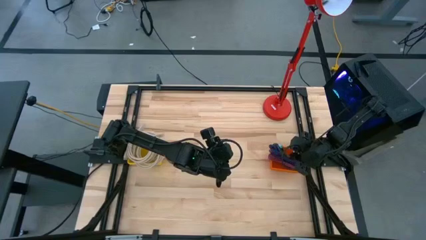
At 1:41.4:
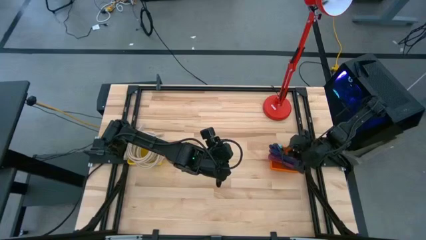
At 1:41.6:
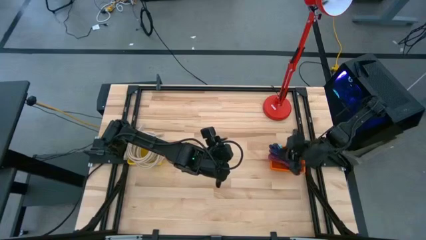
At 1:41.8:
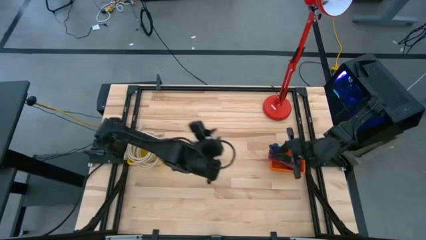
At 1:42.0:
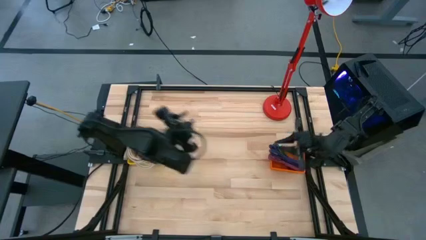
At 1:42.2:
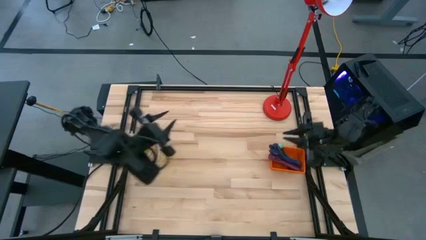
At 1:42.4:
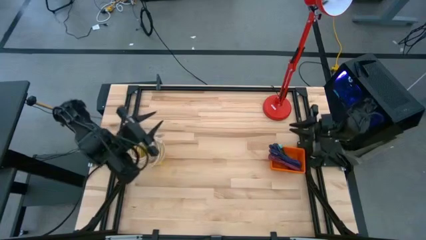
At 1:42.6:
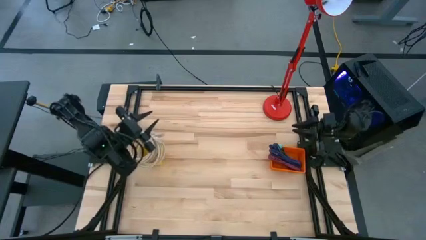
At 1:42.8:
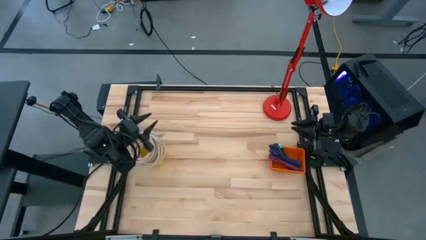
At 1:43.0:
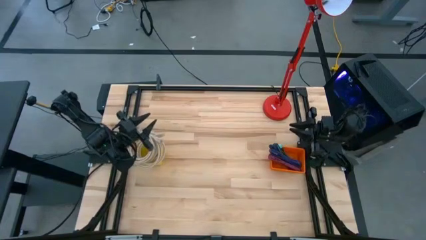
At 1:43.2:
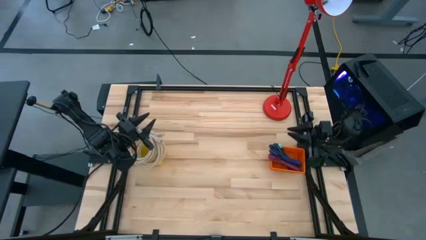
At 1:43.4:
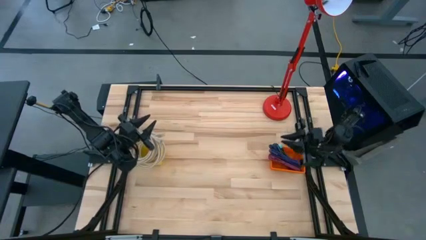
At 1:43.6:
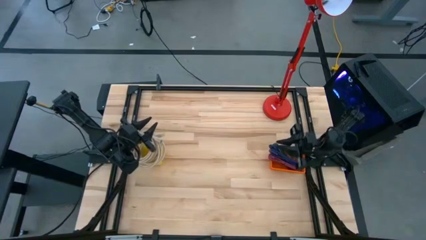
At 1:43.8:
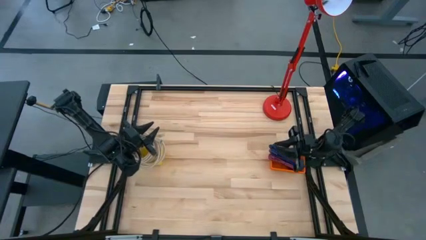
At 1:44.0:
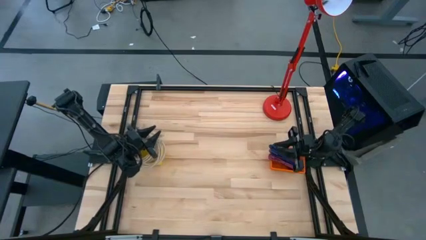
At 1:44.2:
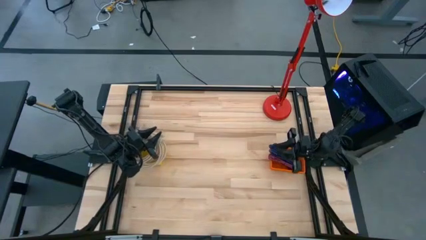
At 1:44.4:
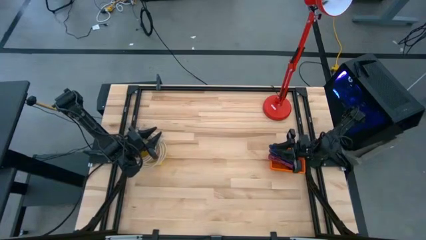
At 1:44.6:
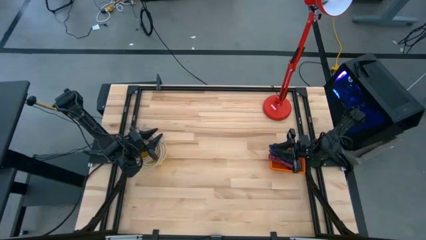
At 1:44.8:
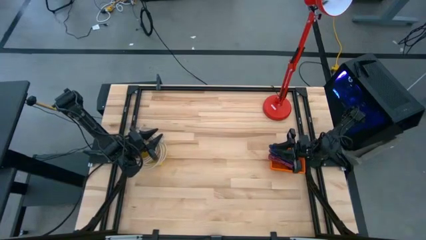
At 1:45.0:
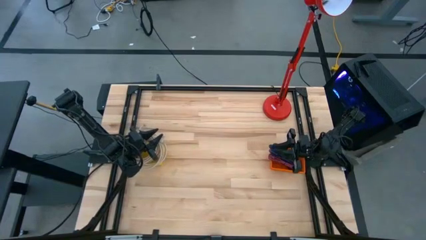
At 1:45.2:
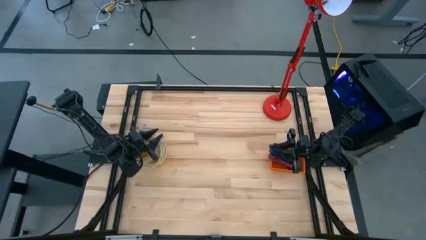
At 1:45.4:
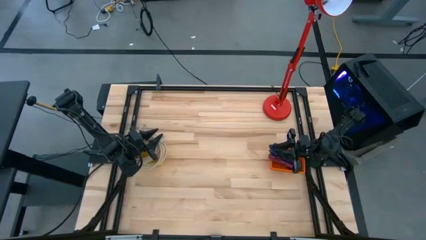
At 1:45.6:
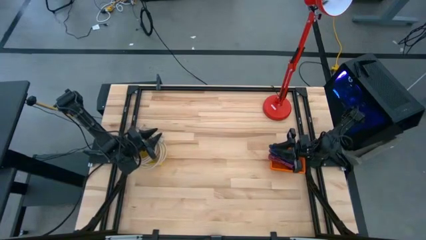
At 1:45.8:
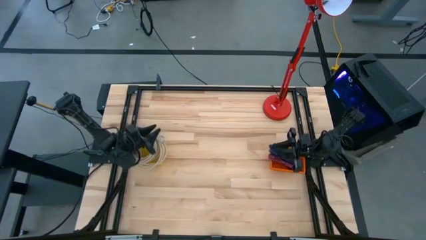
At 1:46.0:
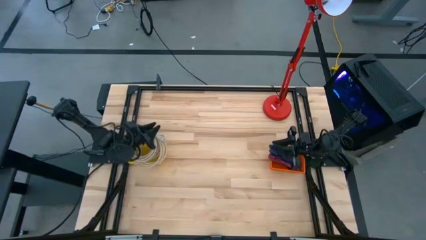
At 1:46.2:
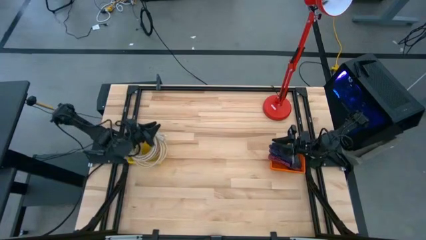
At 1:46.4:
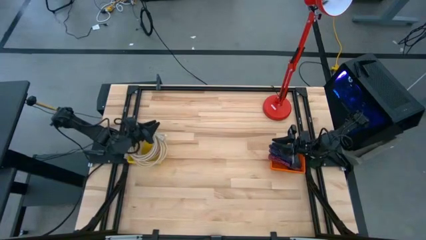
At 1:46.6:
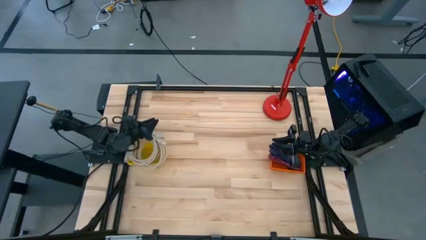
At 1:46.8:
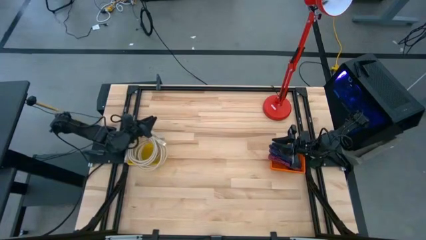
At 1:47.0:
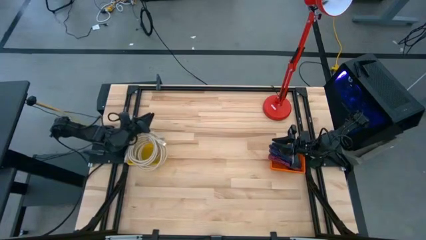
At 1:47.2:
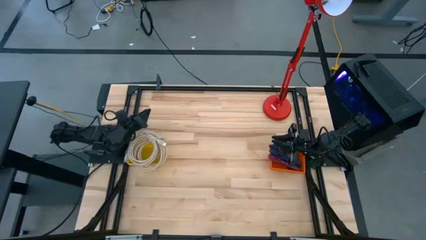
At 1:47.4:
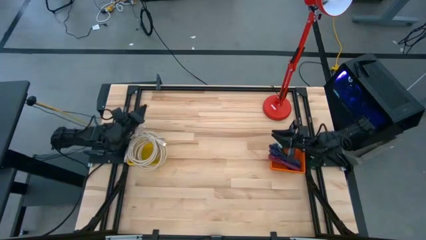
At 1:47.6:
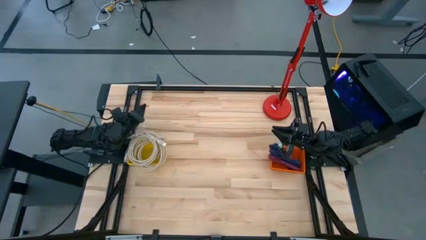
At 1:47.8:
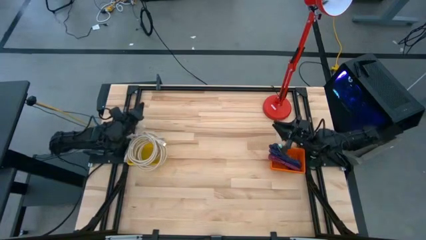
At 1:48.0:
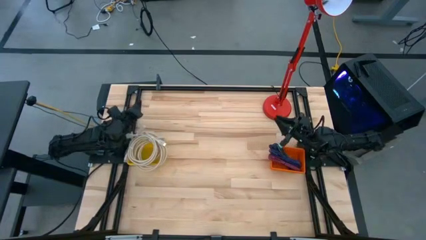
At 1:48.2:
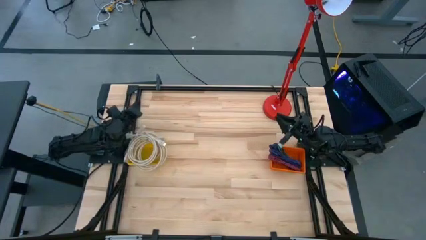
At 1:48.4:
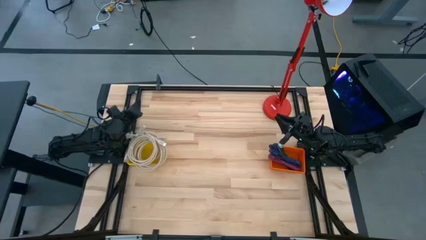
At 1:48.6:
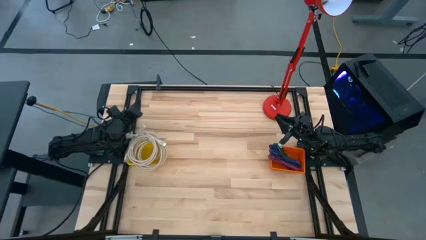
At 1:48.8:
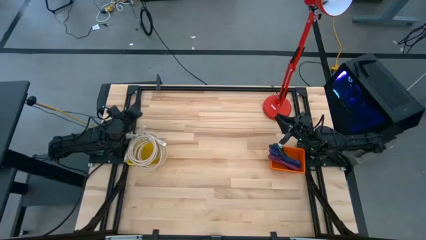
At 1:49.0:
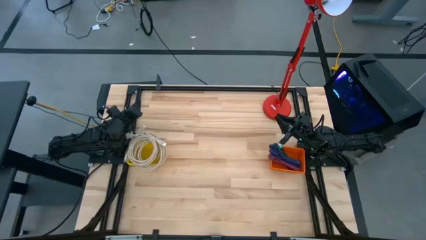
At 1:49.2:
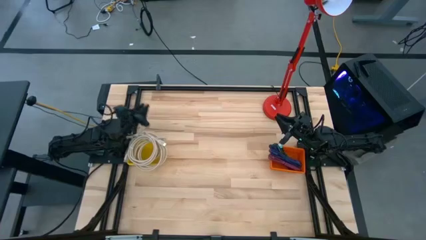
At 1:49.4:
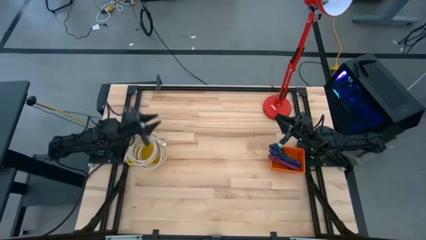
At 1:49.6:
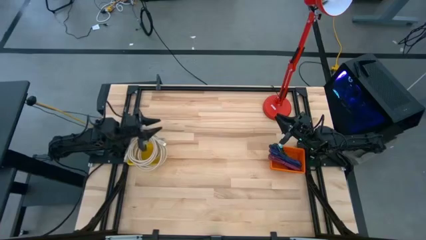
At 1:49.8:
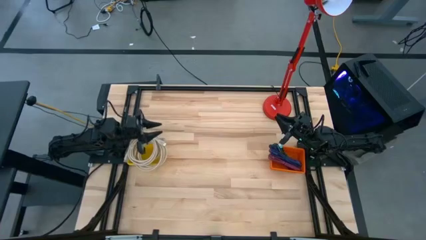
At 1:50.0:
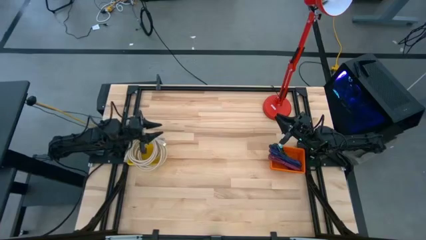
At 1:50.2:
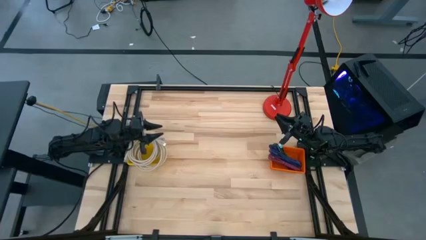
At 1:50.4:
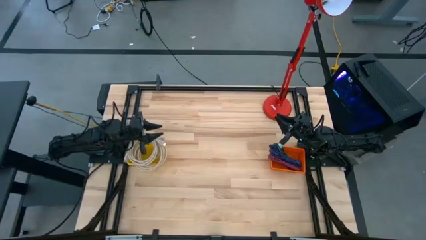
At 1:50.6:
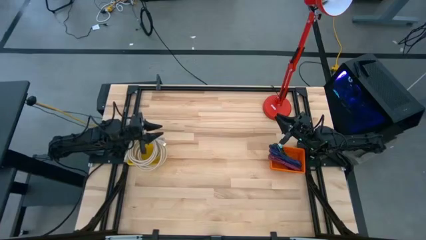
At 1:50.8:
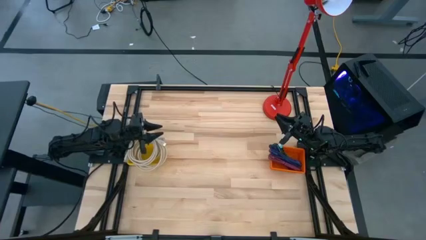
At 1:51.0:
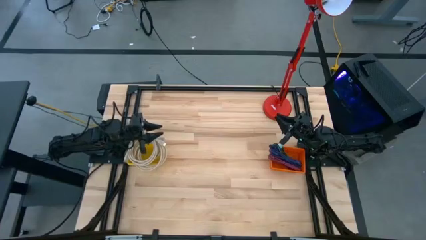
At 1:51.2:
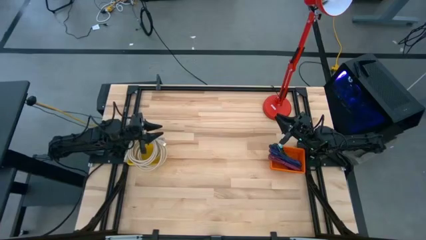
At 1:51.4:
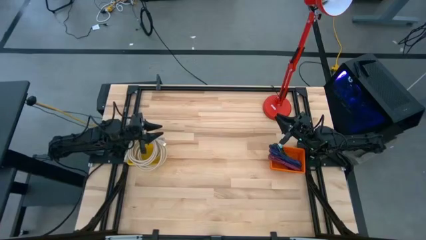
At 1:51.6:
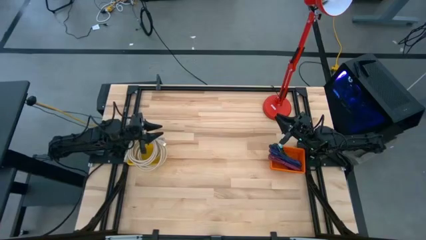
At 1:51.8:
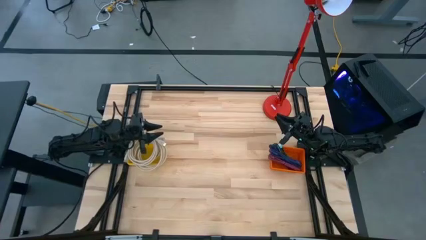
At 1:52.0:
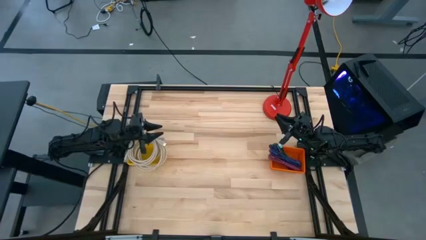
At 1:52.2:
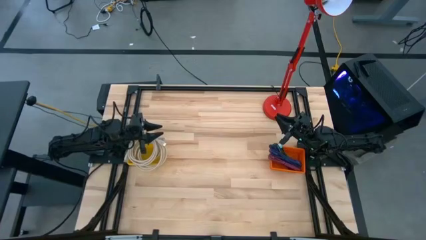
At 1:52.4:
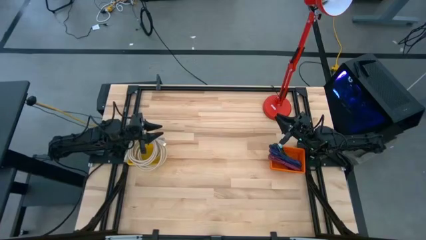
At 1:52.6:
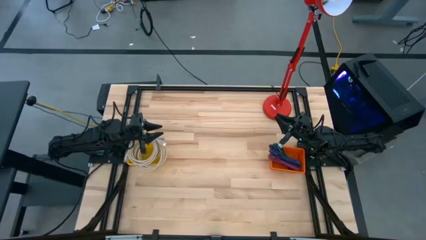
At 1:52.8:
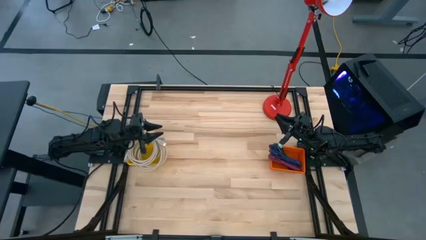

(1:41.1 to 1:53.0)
Task: Pick & Place USB Port
Return to Home Position
